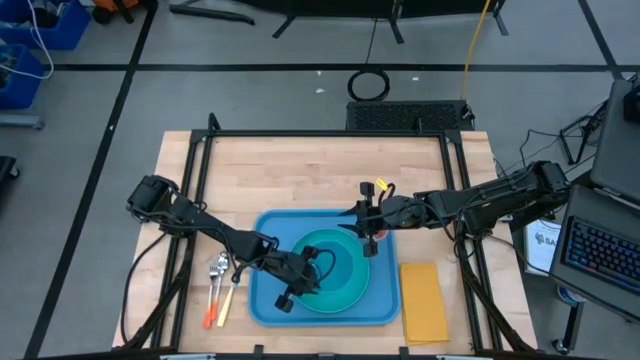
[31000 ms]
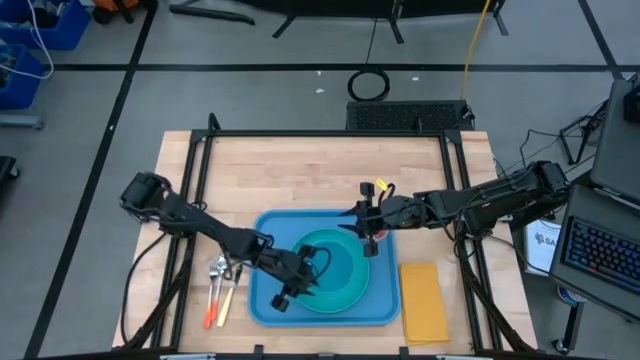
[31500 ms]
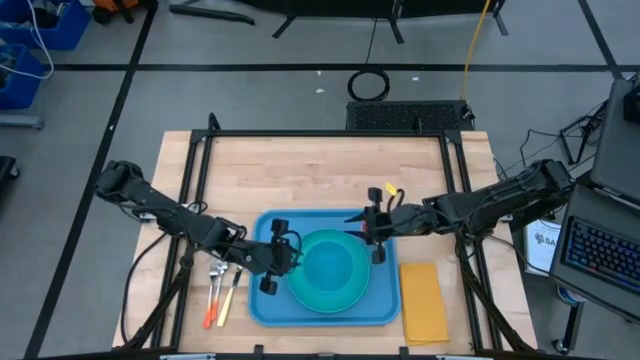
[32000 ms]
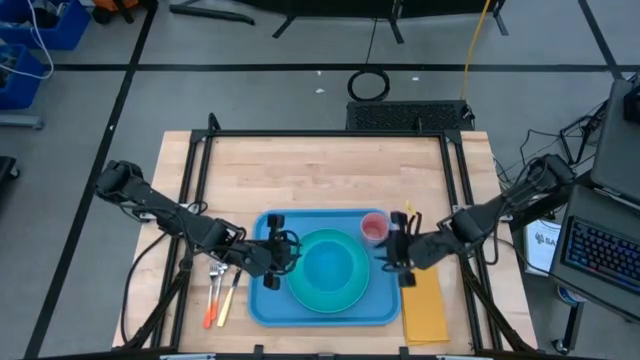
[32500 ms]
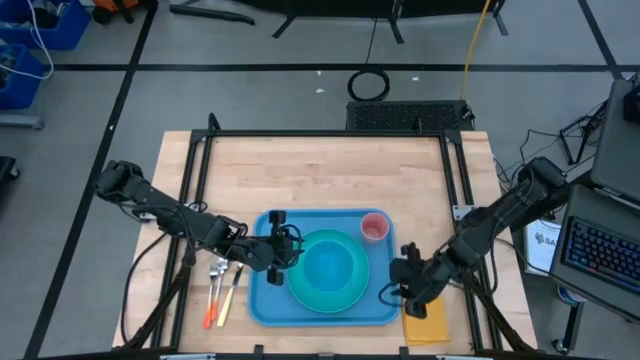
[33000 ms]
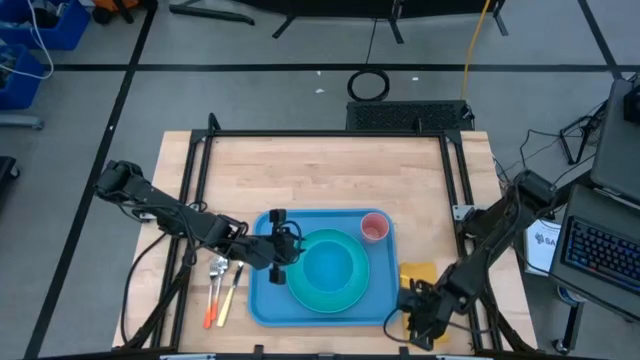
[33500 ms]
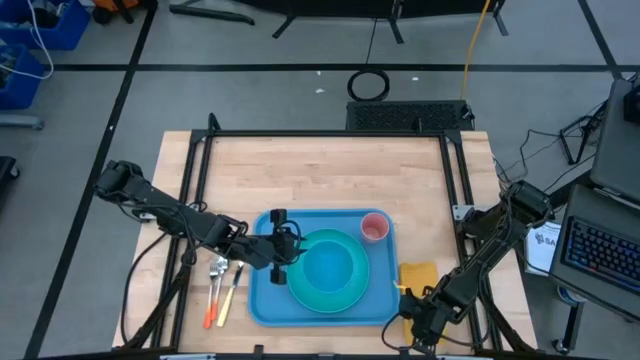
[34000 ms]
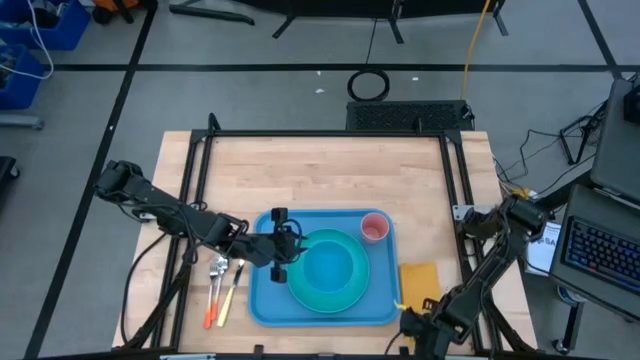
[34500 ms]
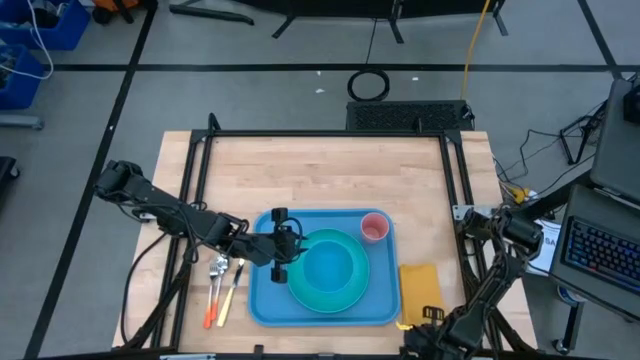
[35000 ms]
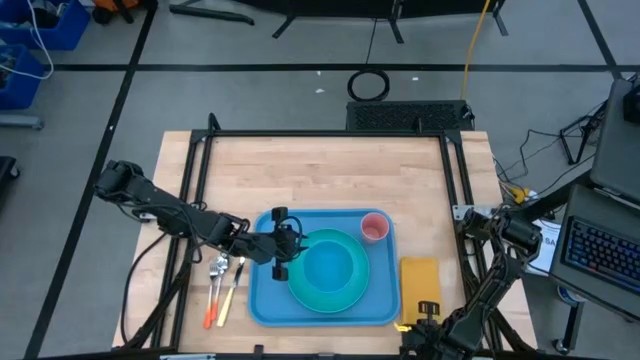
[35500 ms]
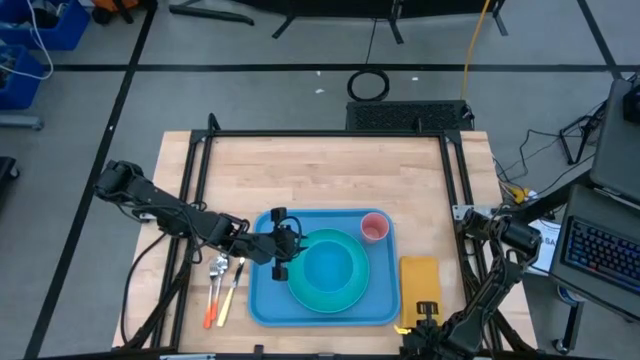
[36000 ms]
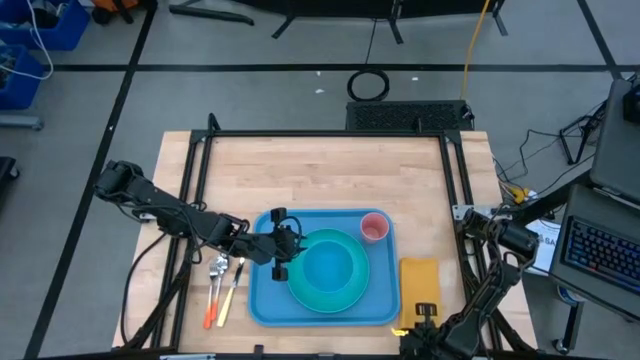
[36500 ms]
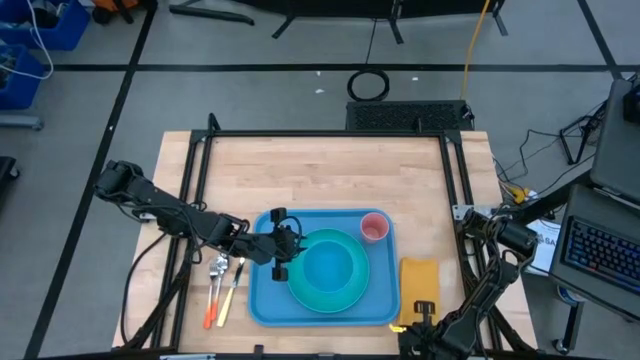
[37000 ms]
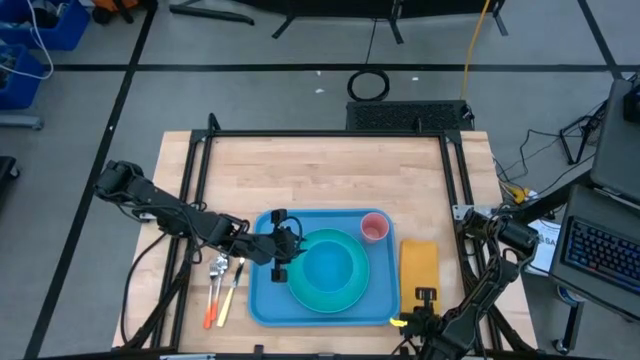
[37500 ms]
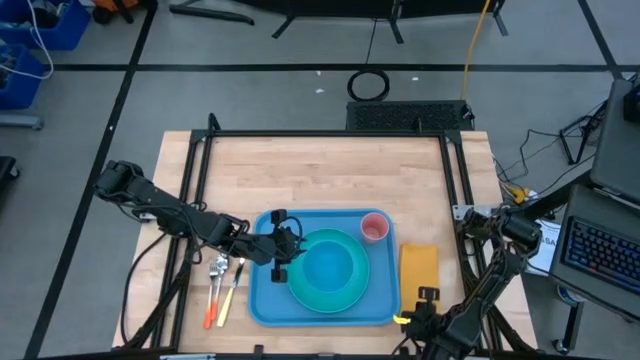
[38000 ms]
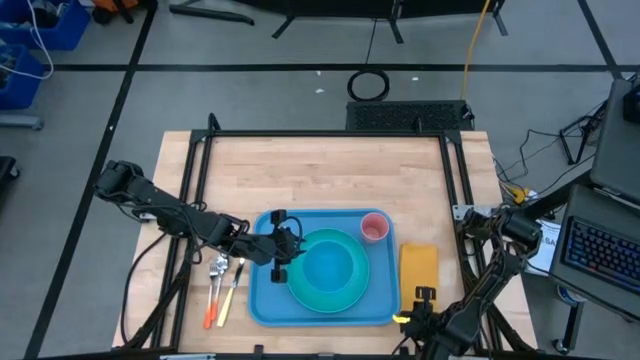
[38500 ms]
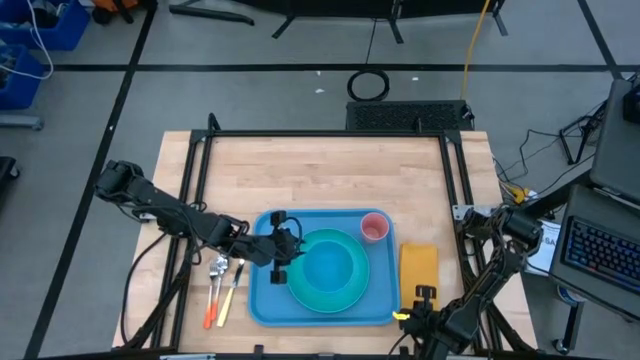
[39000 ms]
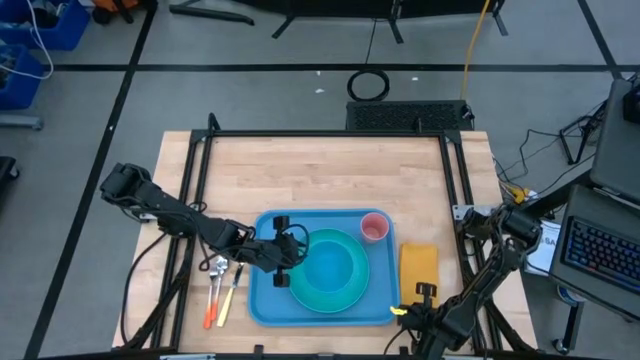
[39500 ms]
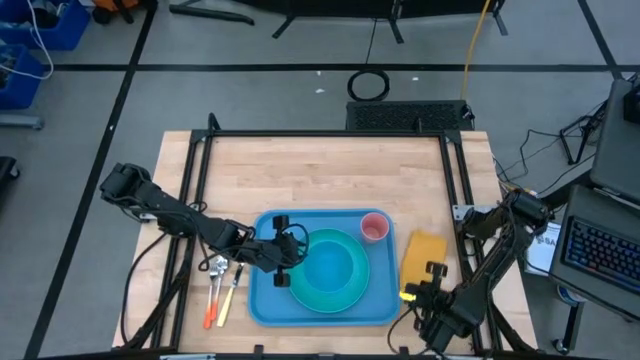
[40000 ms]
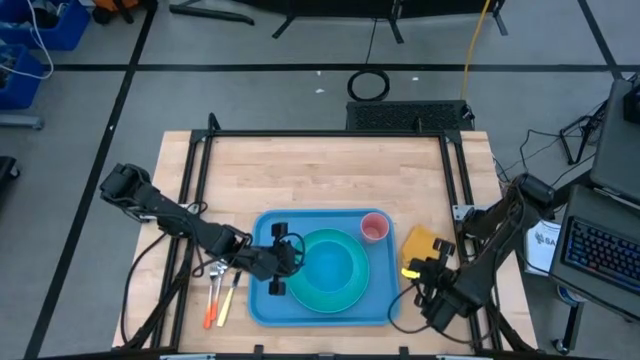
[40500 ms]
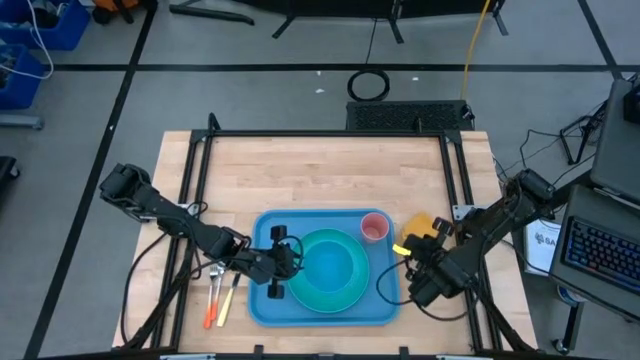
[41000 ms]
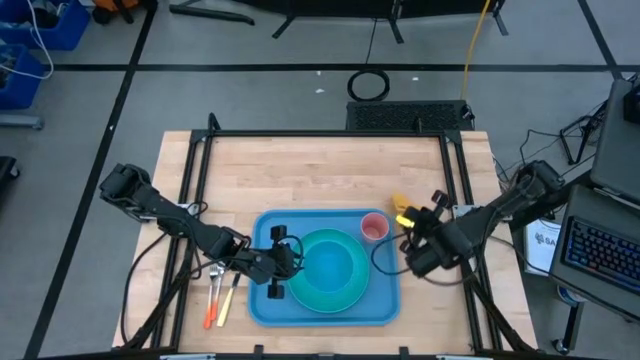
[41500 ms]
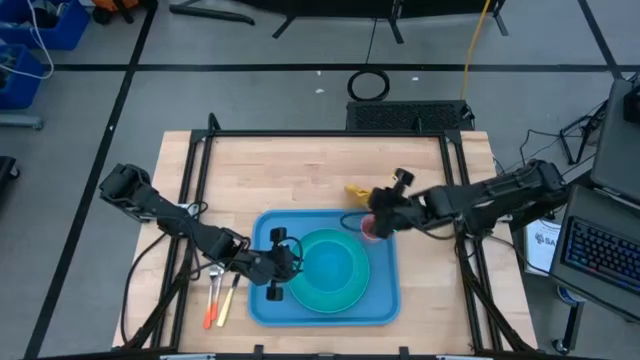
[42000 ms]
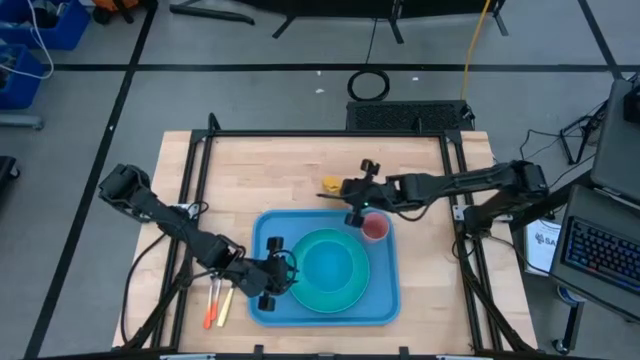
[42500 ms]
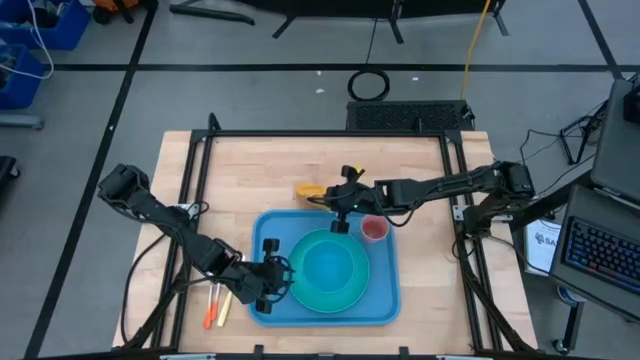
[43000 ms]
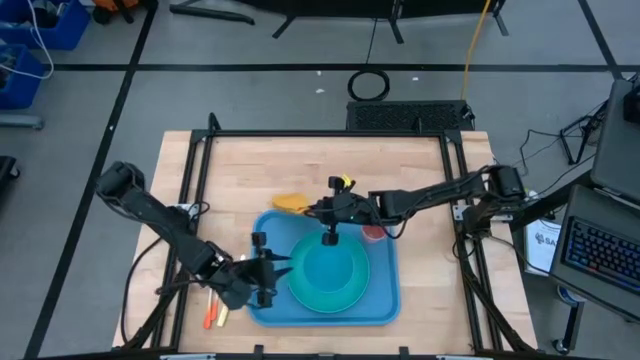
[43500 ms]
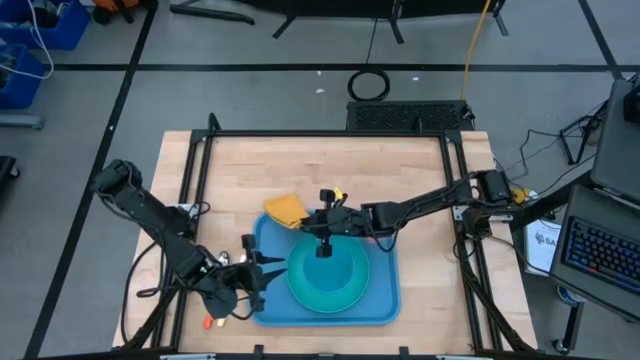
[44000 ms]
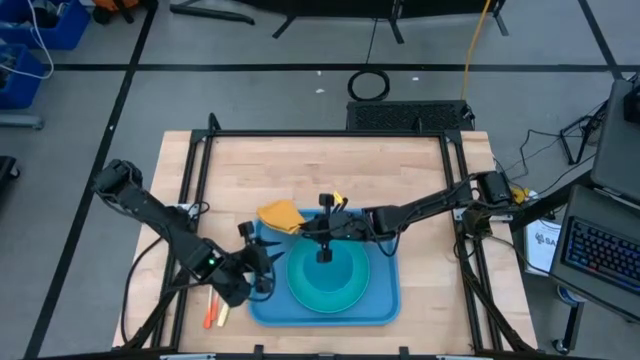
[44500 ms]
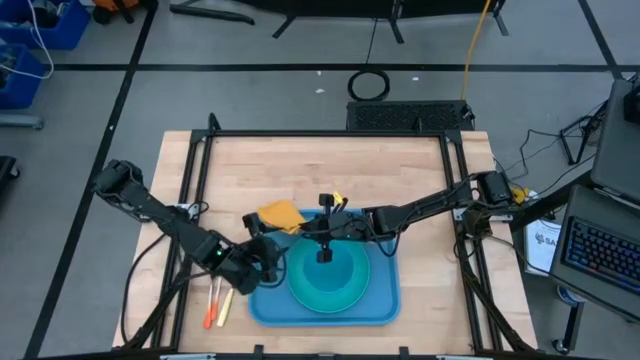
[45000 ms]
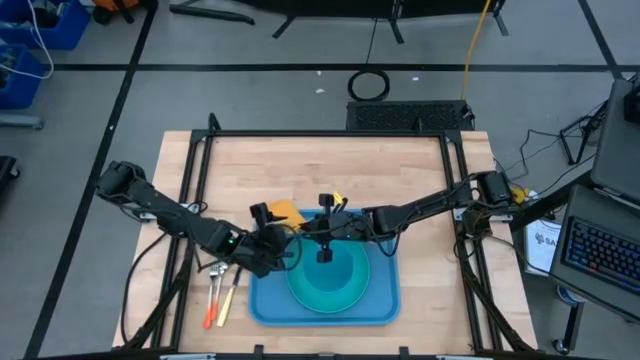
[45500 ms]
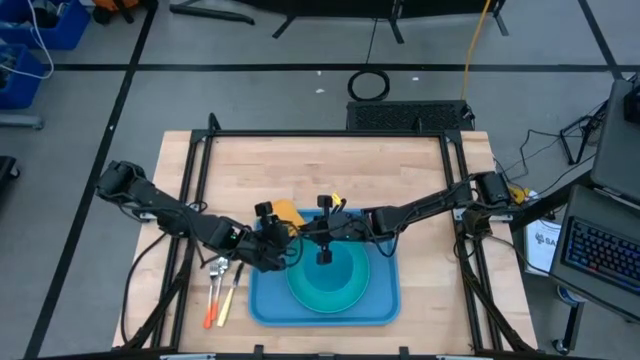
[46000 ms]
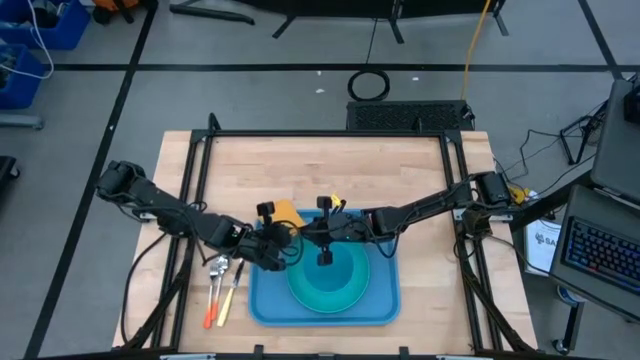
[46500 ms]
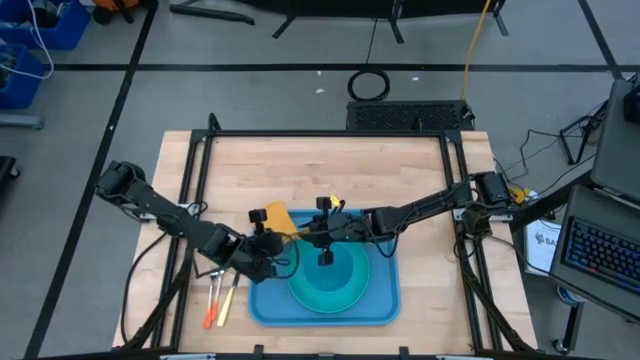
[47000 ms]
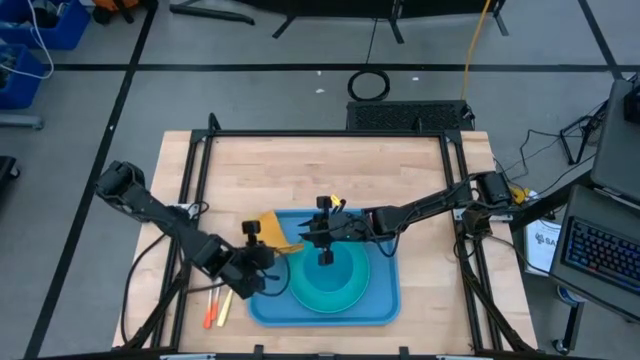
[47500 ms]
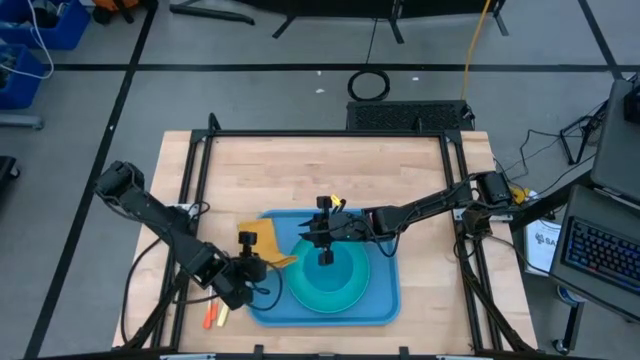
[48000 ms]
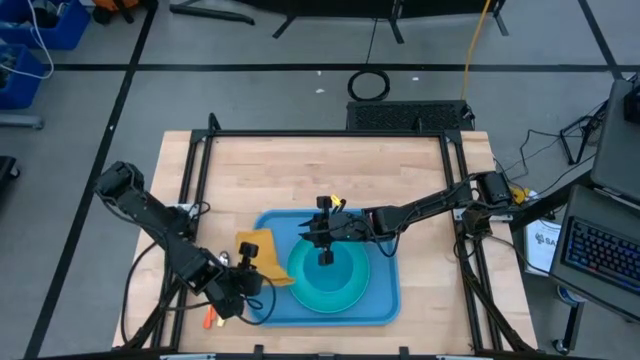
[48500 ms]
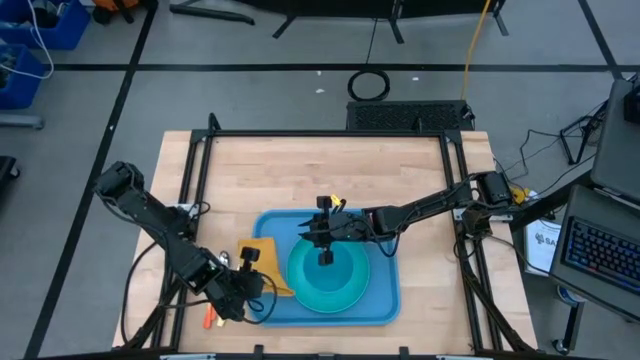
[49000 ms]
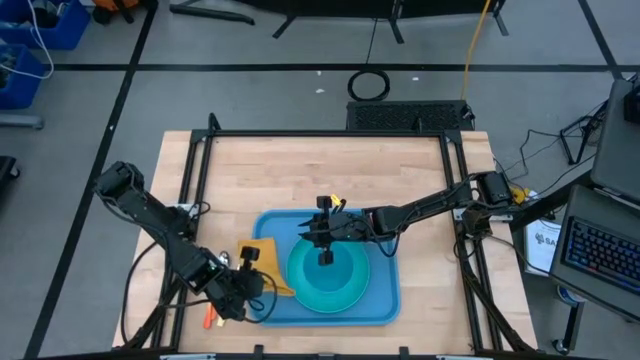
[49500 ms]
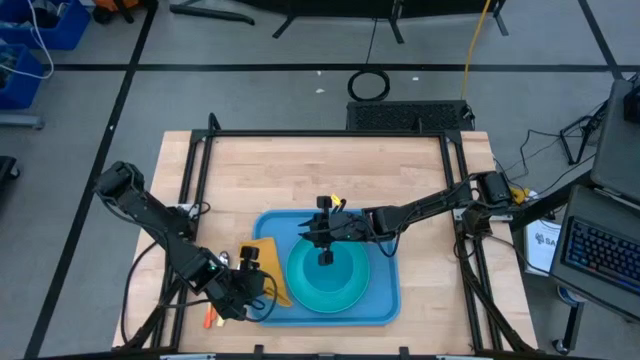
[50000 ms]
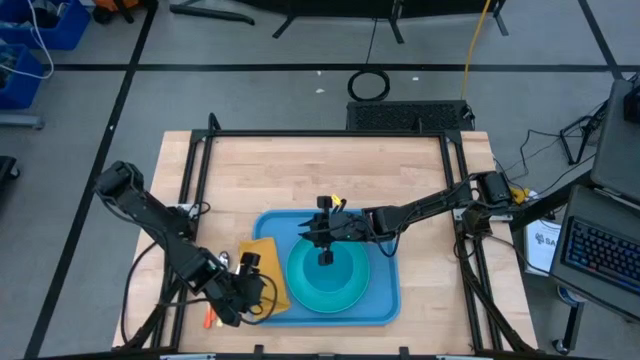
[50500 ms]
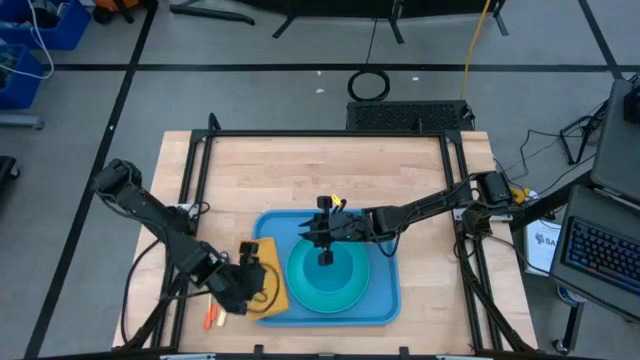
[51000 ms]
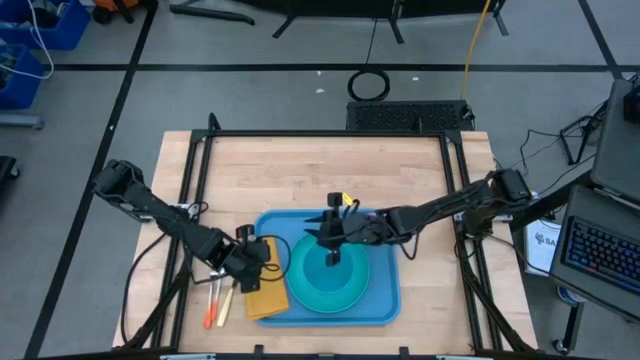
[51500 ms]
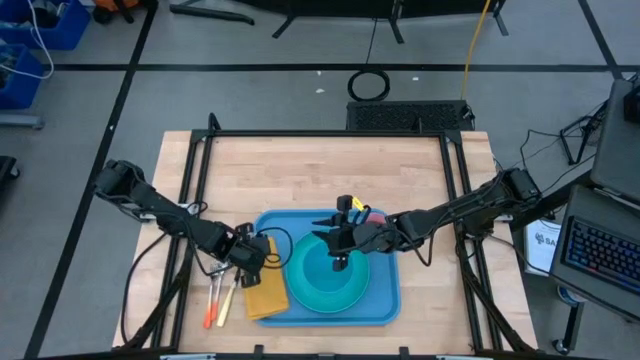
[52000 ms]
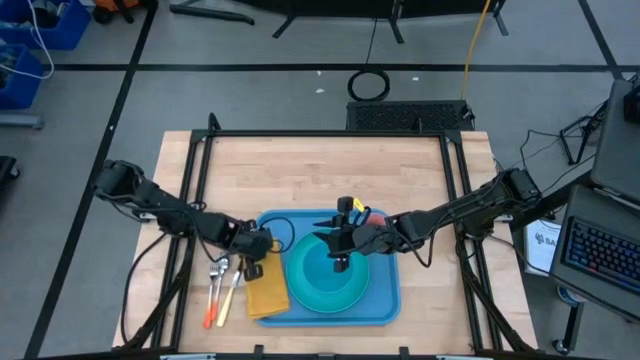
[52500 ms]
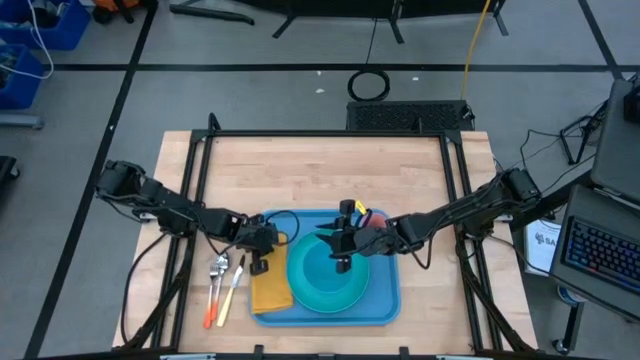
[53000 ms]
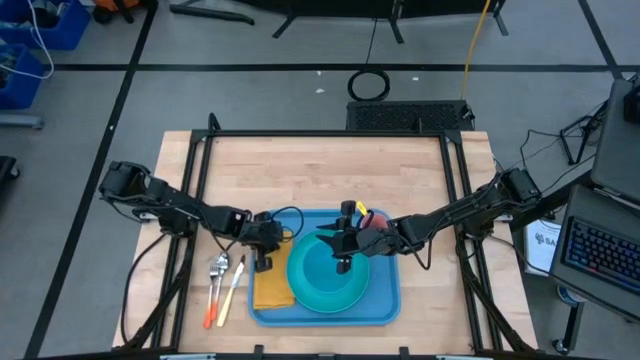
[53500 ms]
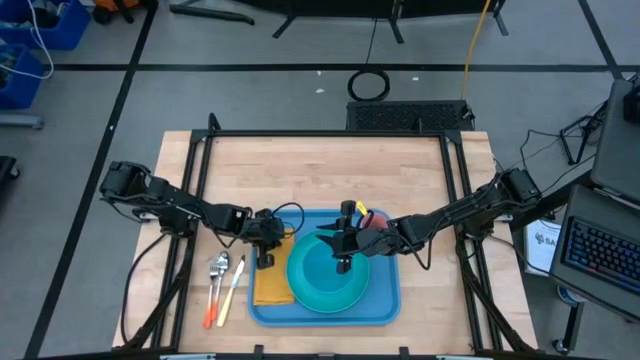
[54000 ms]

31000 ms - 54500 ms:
Task: Set up tray
Put the yellow napkin on the left green plate in the blue serving tray
